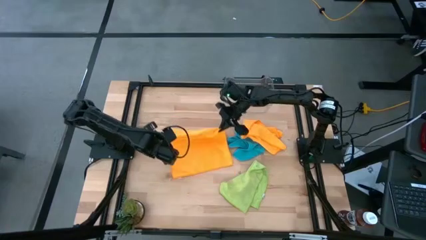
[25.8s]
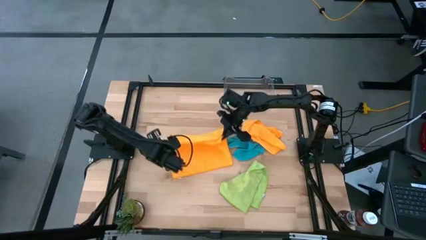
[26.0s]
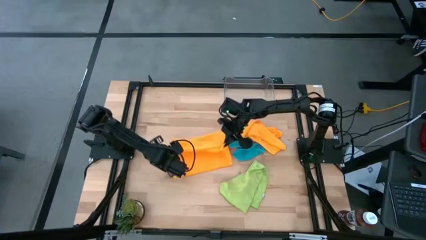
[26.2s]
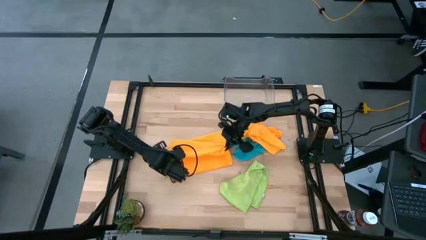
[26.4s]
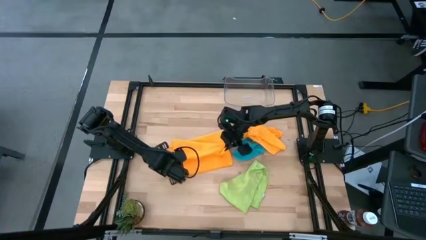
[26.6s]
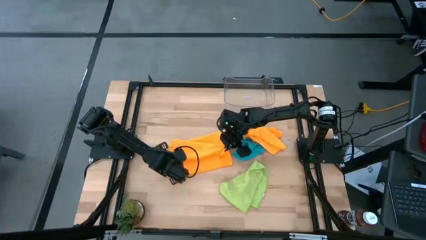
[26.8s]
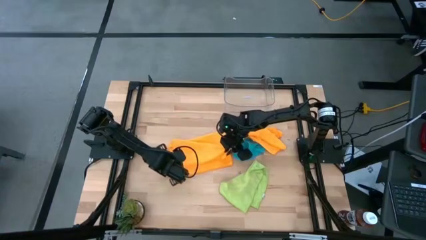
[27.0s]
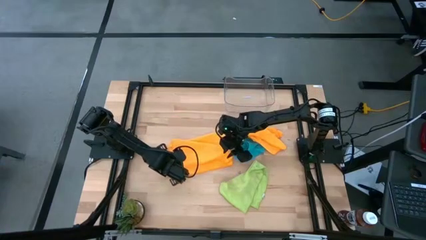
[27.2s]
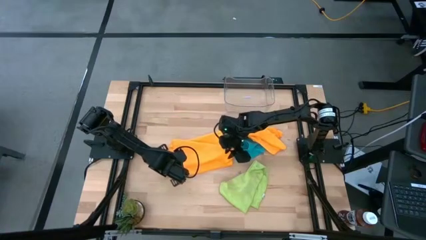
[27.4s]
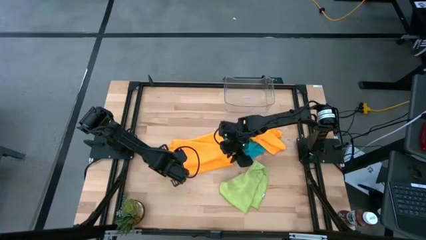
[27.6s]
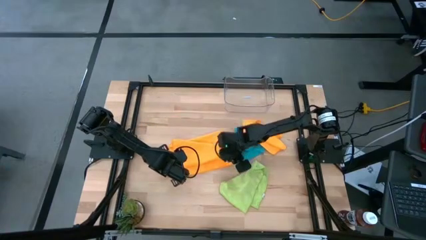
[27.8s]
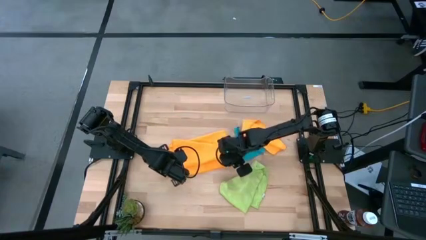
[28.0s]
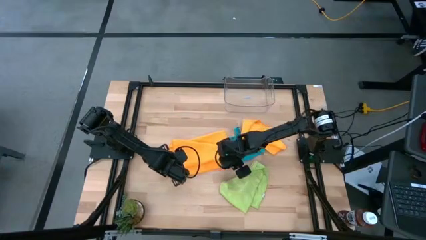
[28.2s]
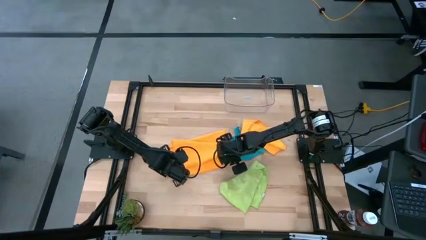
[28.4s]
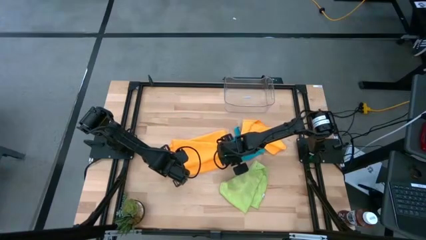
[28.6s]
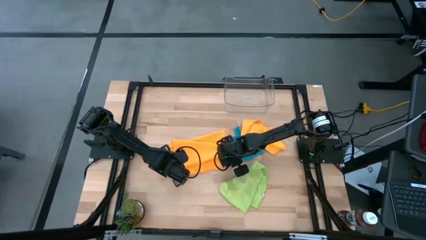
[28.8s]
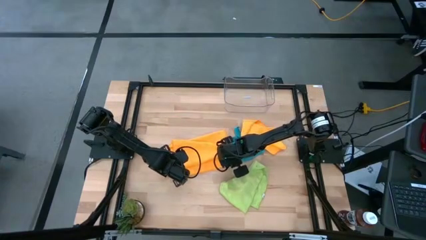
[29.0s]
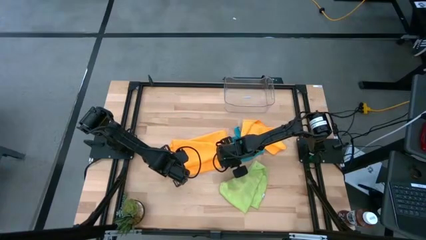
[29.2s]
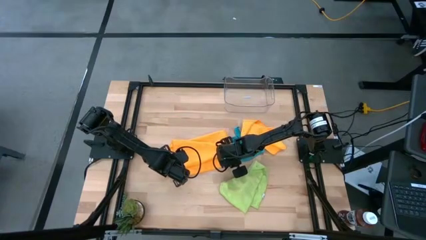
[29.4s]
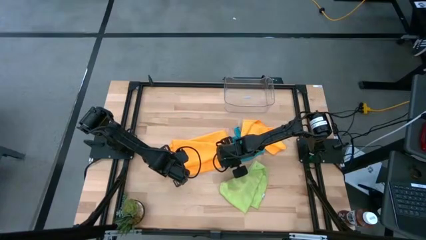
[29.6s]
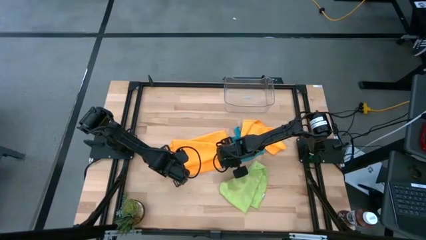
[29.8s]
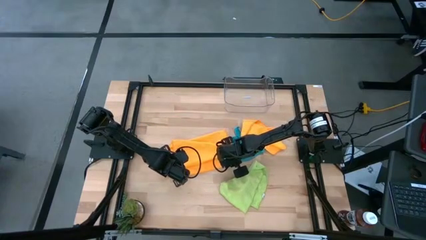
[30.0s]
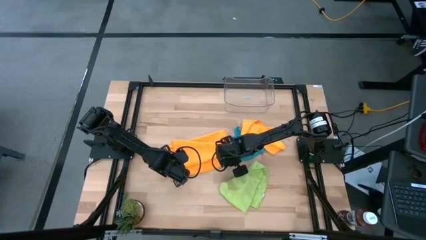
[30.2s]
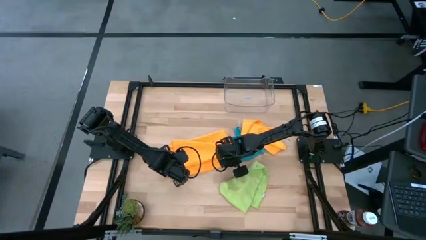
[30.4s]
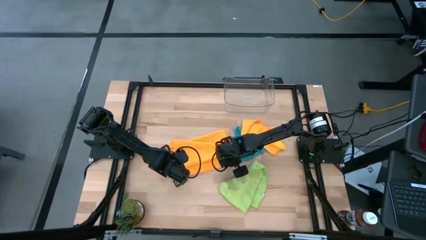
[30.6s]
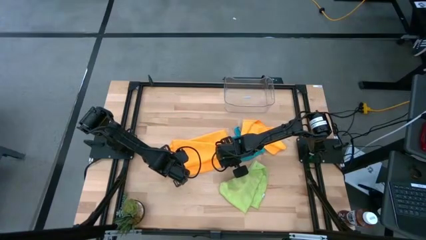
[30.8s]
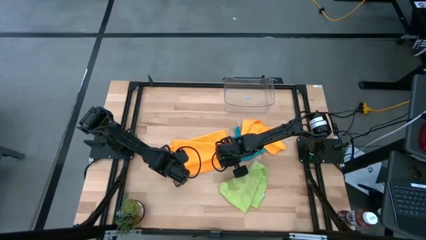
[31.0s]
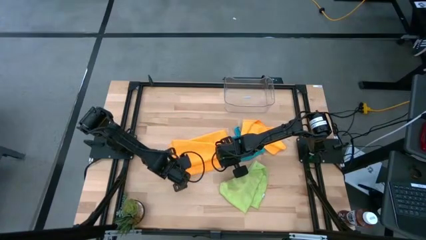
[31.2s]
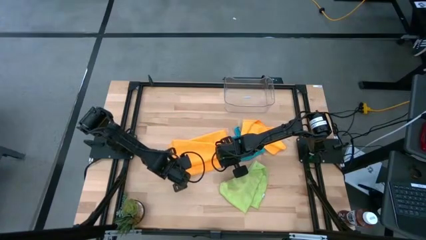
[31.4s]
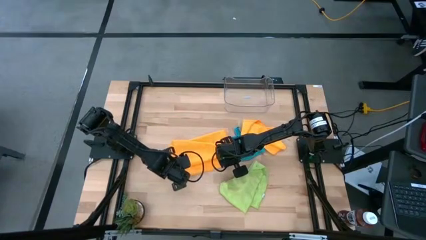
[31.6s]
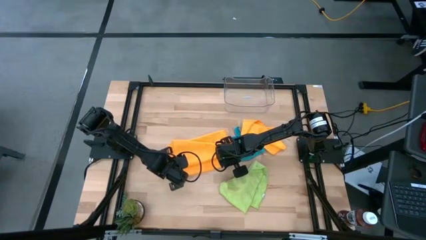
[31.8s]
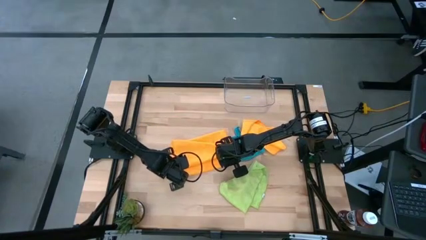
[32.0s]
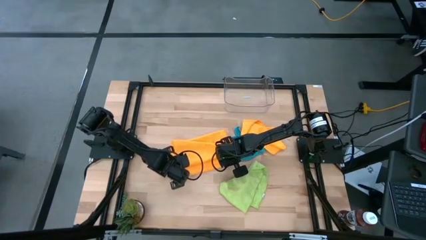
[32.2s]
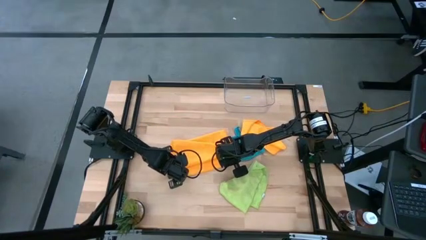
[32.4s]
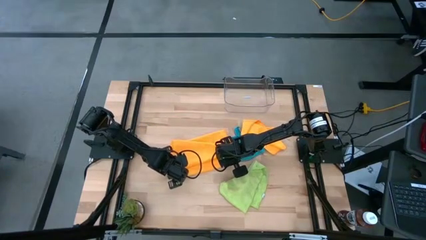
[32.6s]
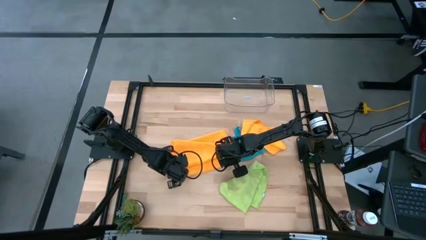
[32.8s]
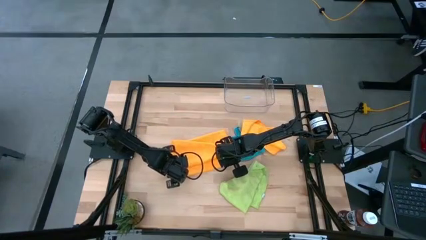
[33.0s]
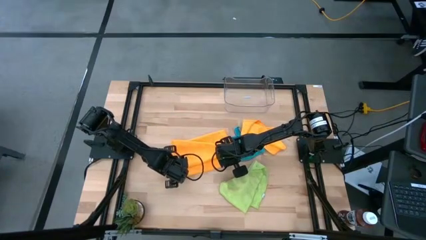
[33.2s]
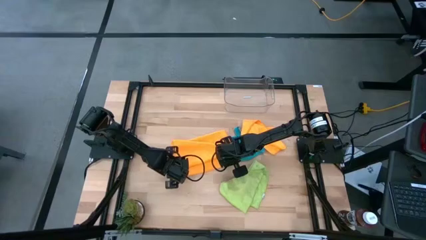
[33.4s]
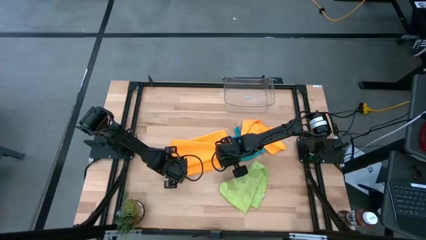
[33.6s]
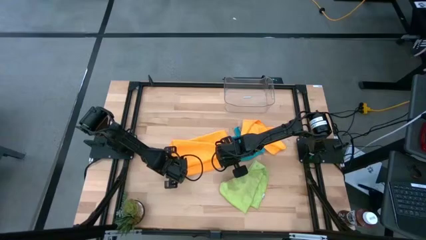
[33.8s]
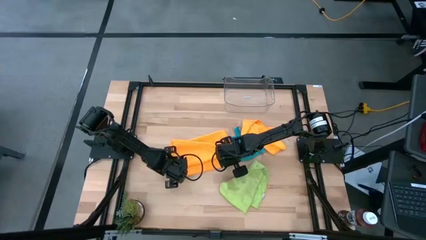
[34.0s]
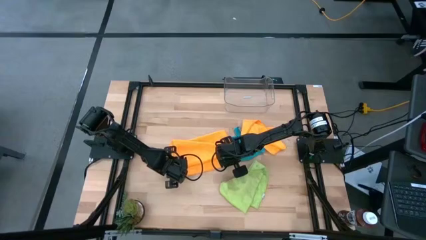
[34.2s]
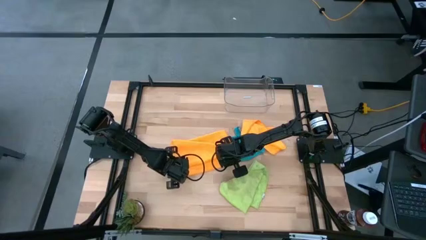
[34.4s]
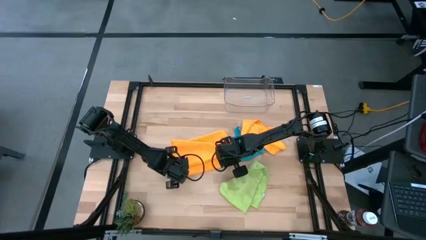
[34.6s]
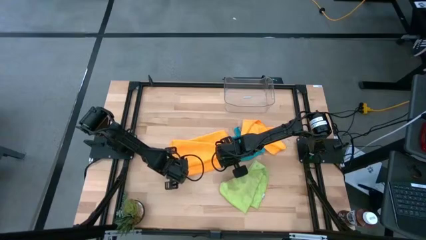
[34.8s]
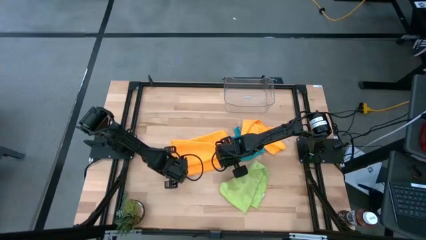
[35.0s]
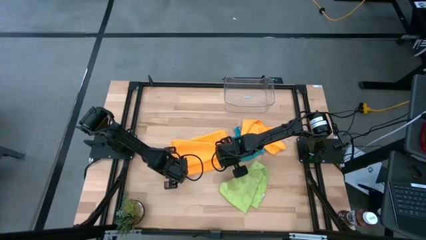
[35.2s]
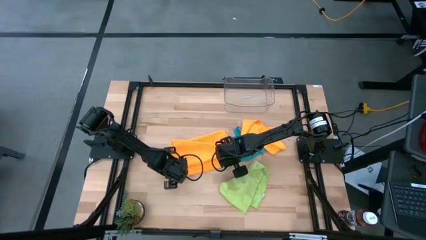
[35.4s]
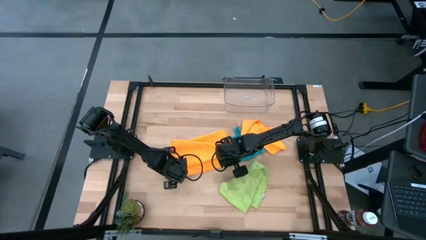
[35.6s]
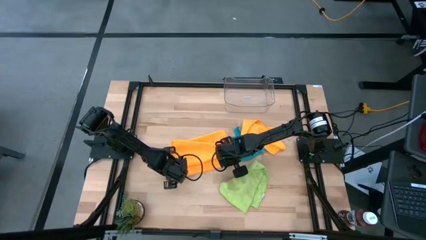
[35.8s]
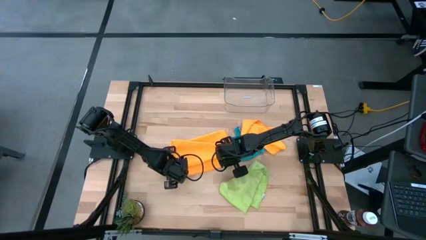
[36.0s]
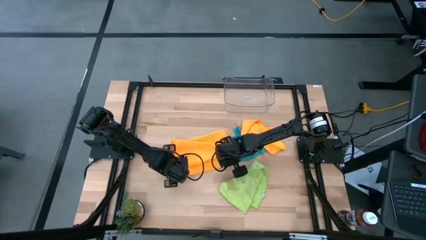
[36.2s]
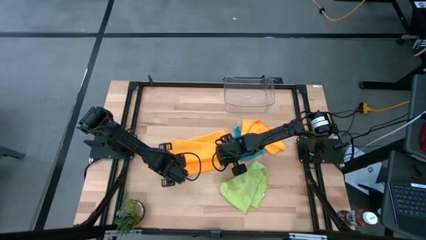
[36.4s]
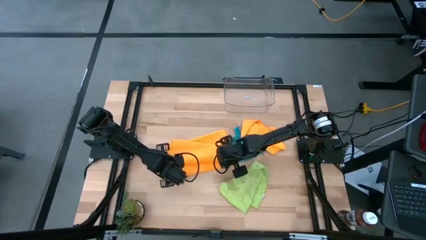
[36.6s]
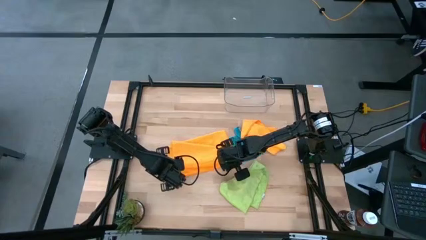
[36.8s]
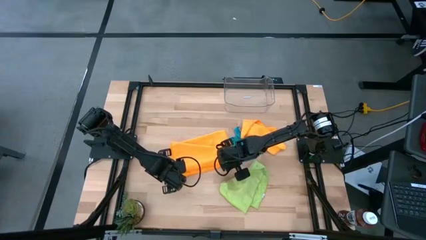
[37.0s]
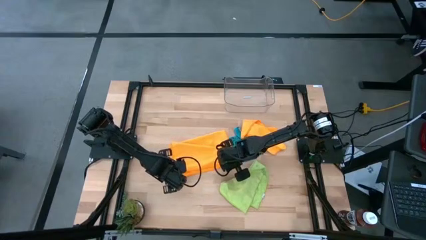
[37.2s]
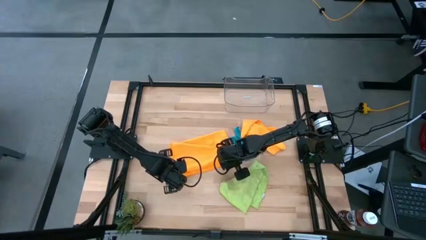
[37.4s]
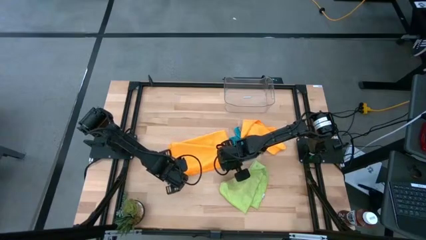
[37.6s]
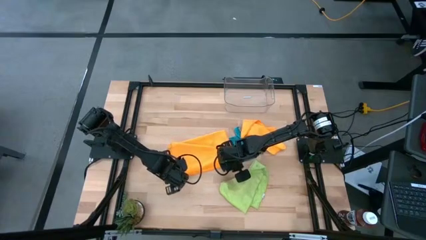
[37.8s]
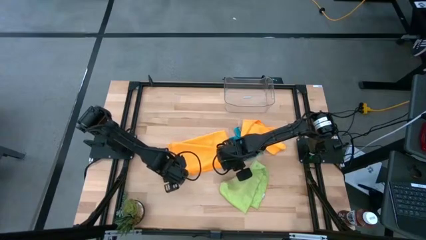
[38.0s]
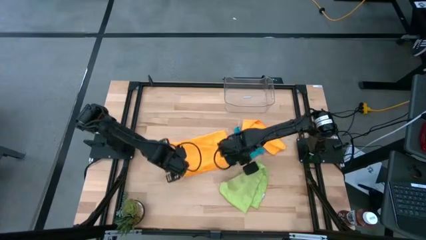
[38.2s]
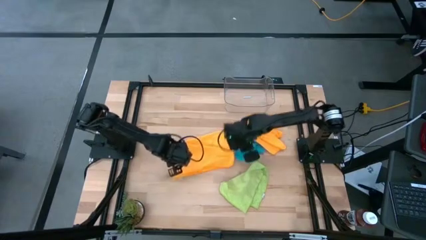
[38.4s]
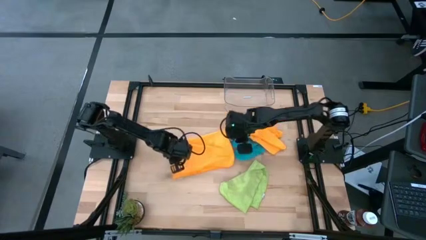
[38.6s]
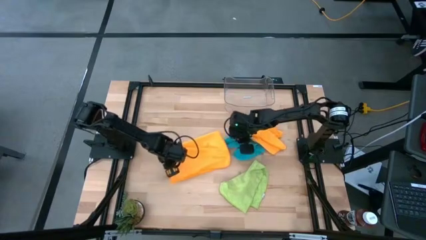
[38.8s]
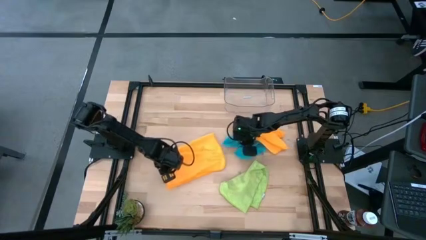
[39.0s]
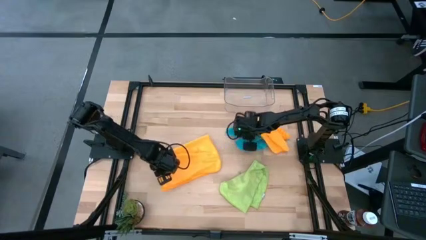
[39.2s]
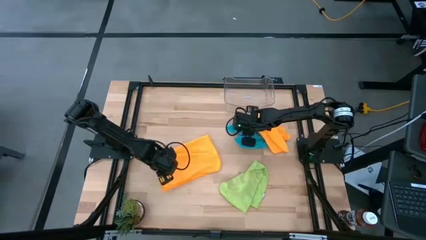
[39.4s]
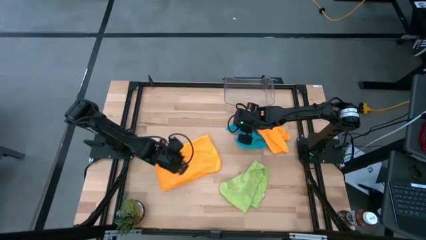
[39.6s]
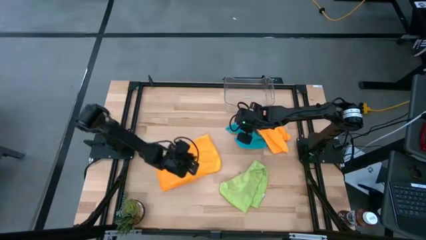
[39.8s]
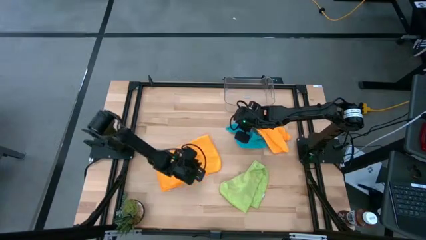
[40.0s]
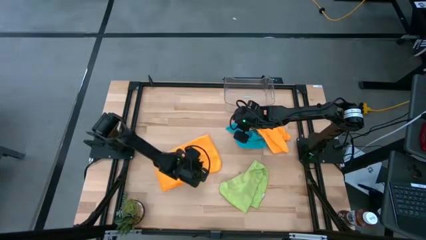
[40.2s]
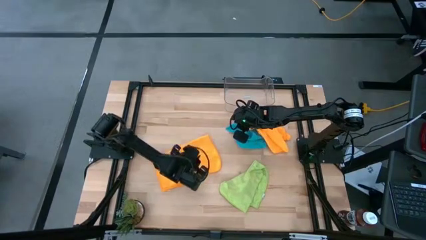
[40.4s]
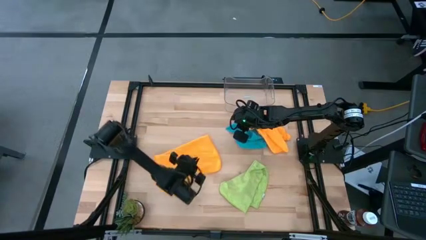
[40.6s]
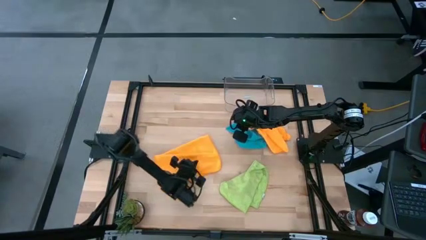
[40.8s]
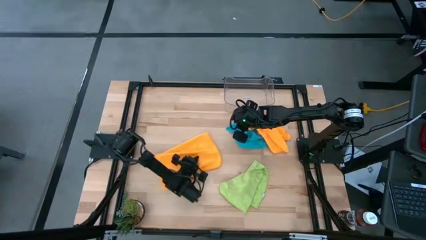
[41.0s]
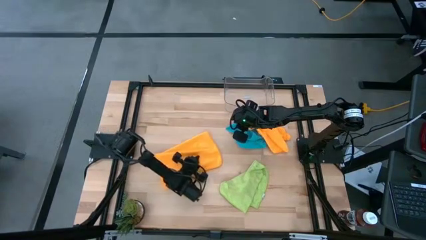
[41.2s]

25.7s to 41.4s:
Task: Fold microfiber towels
Fold the left yellow microfiber cloth
